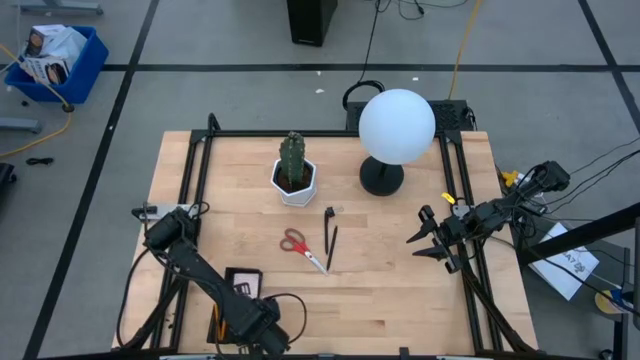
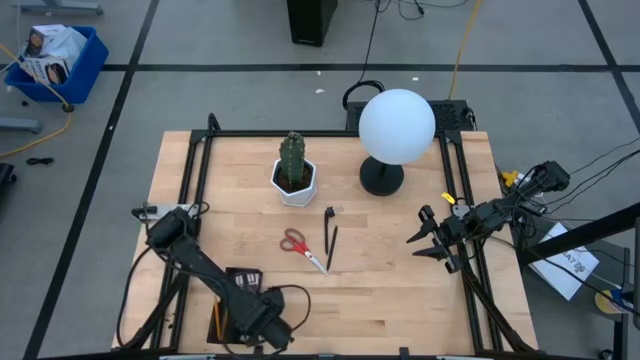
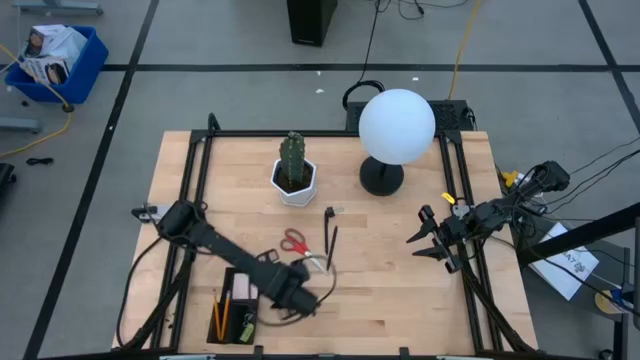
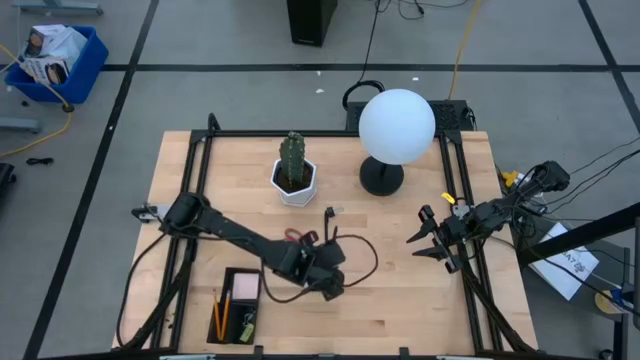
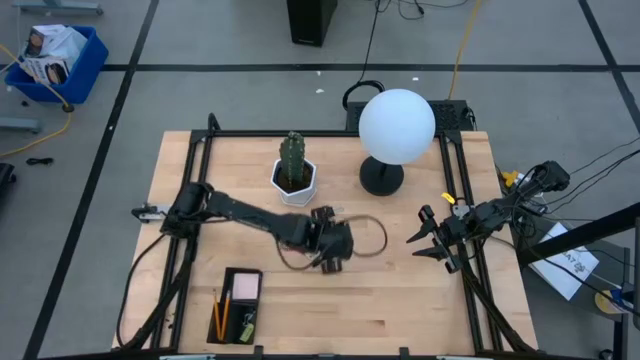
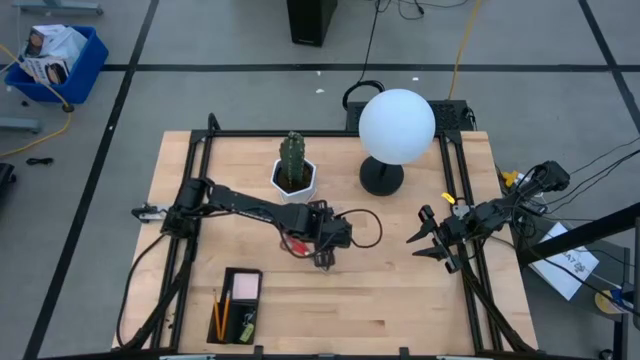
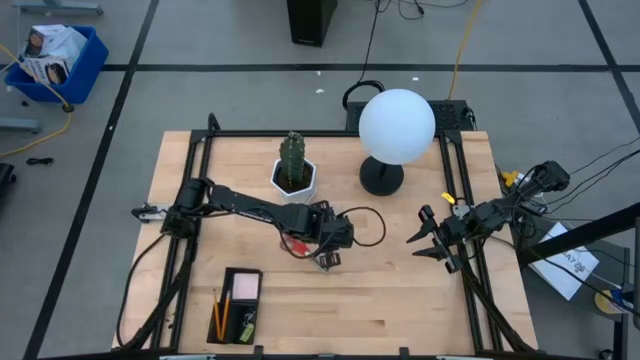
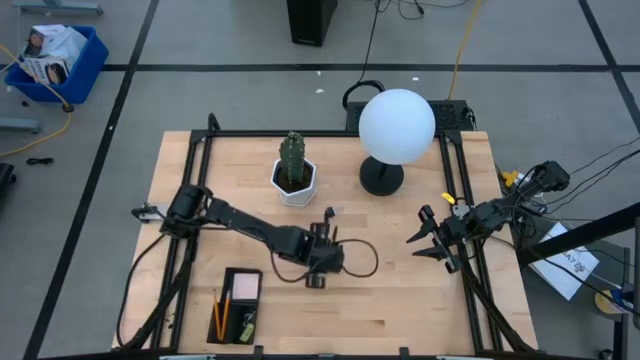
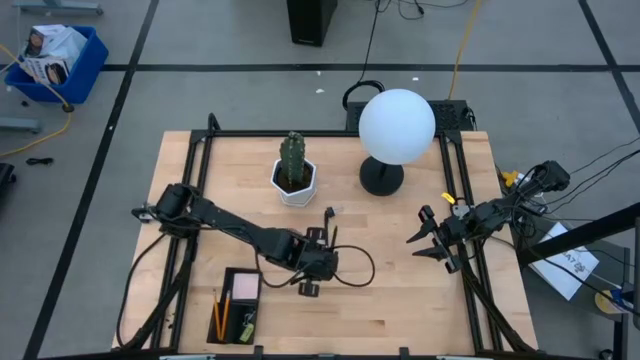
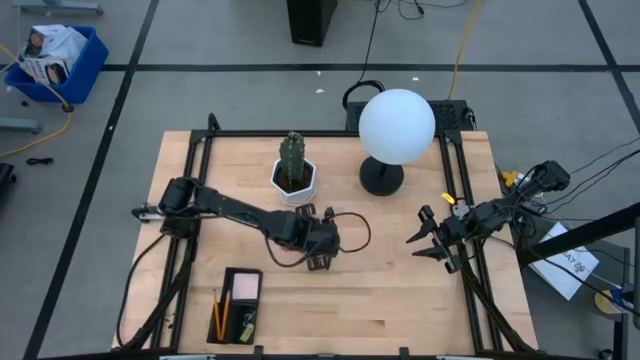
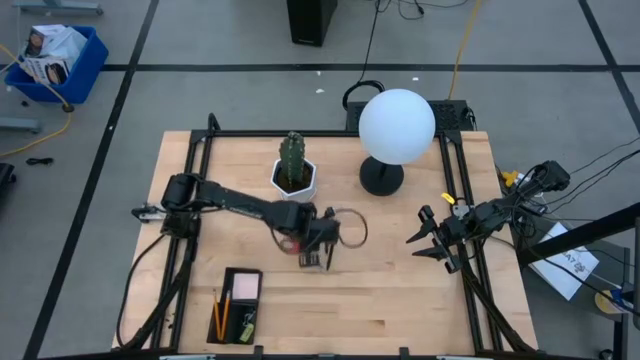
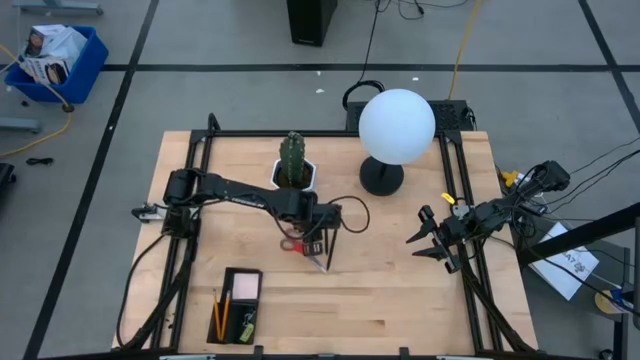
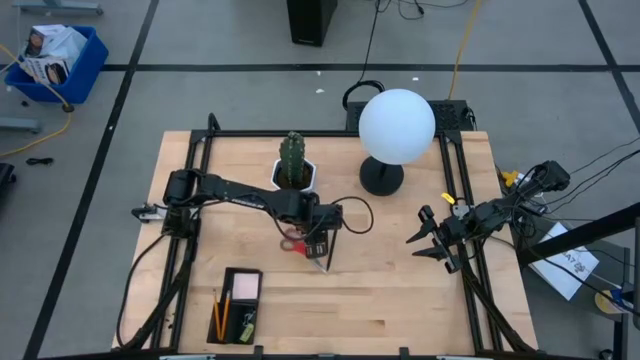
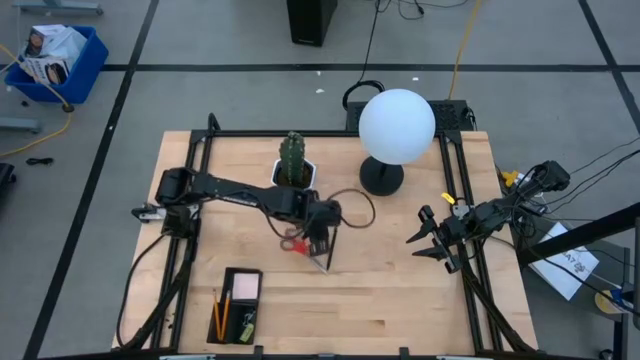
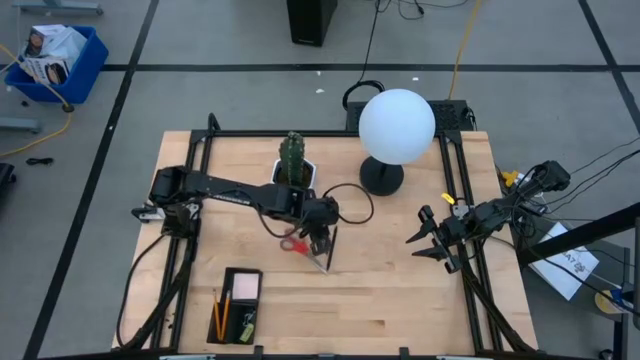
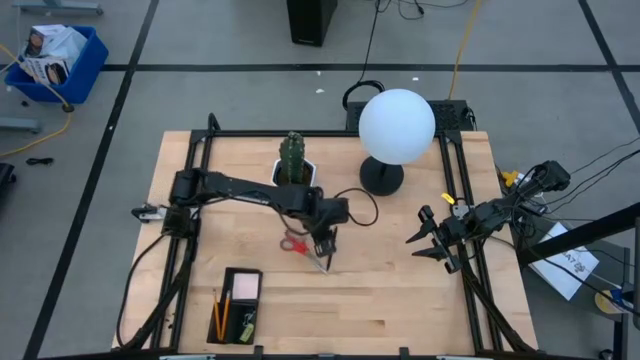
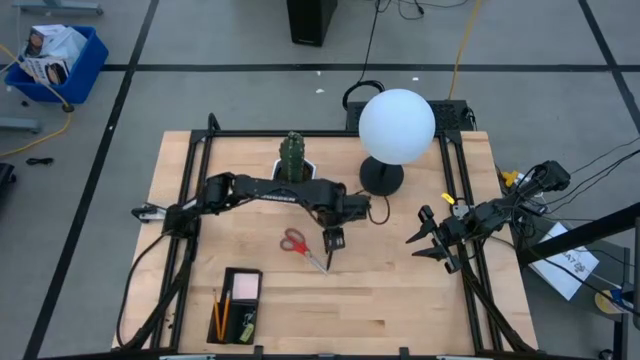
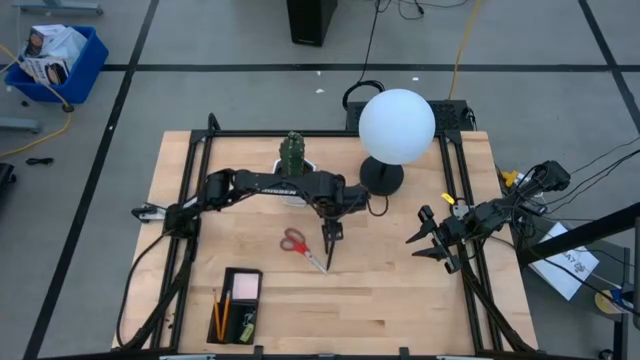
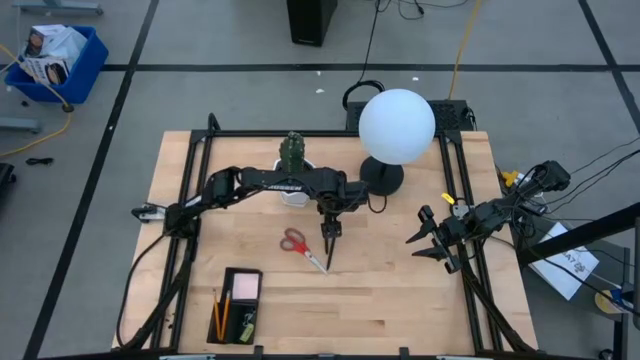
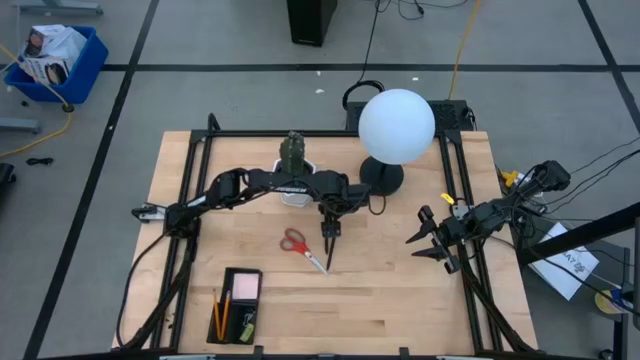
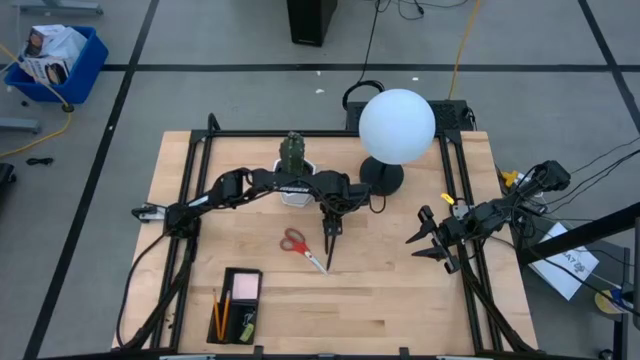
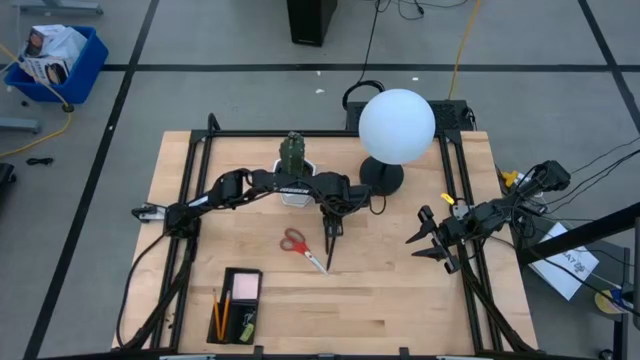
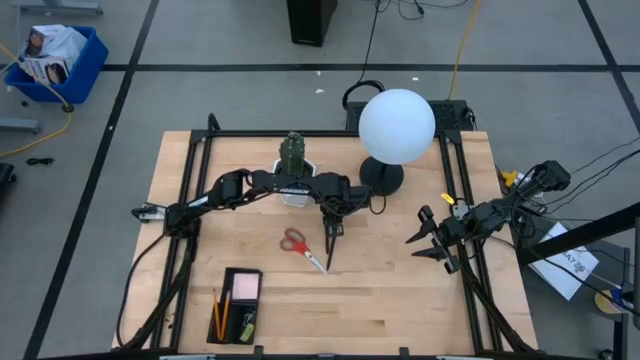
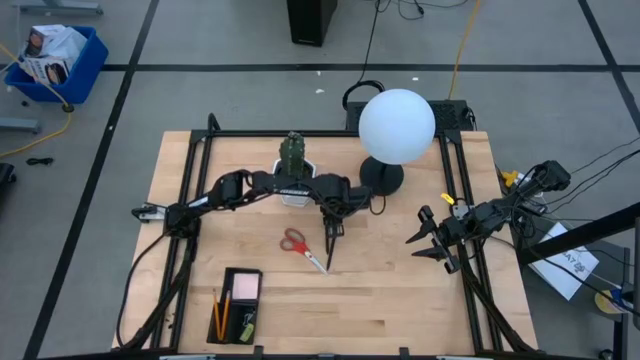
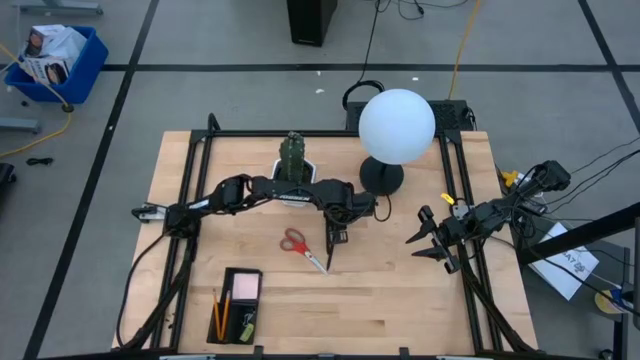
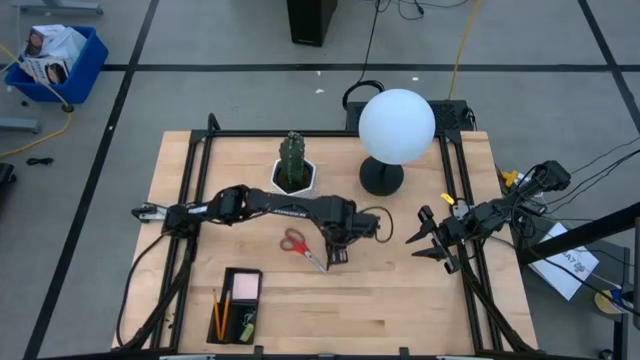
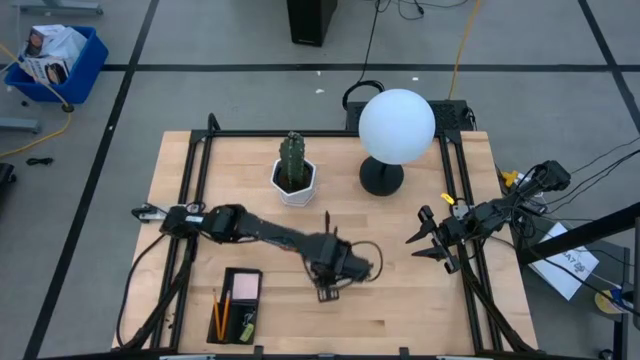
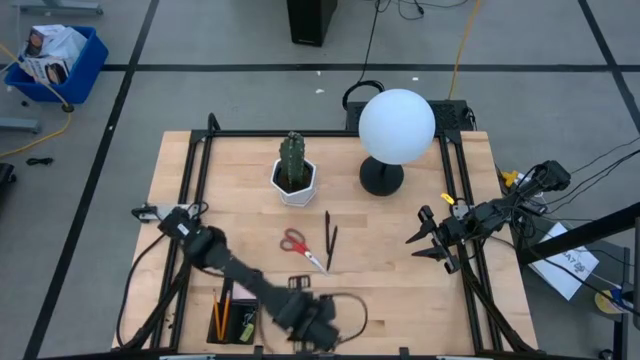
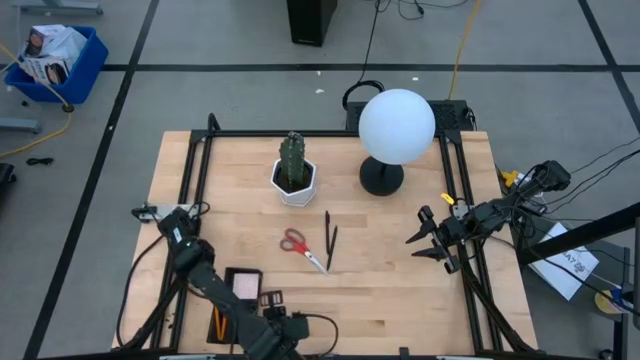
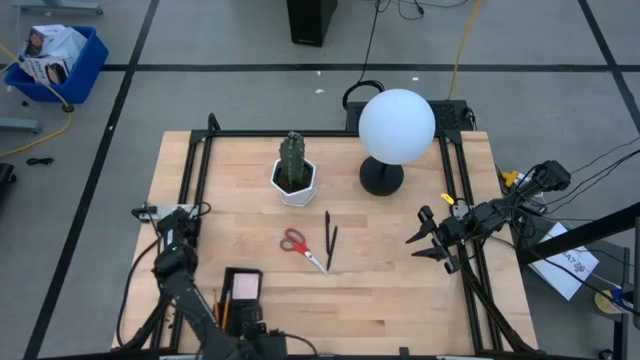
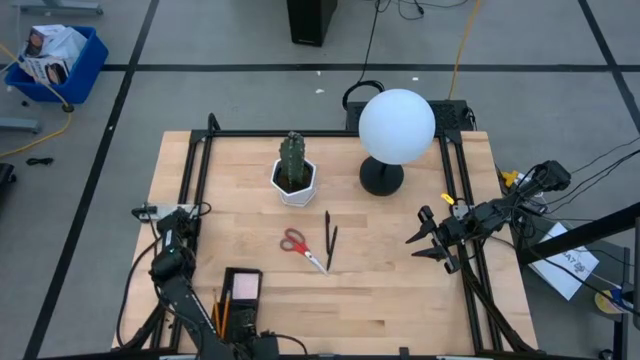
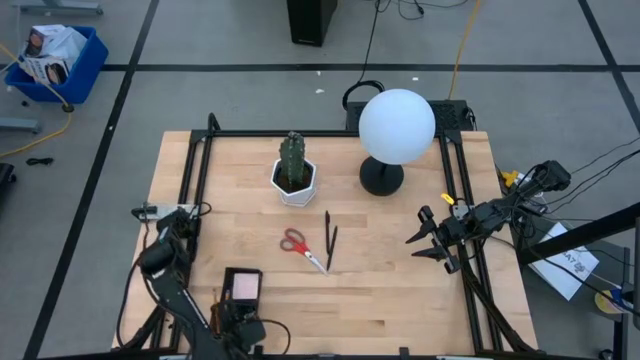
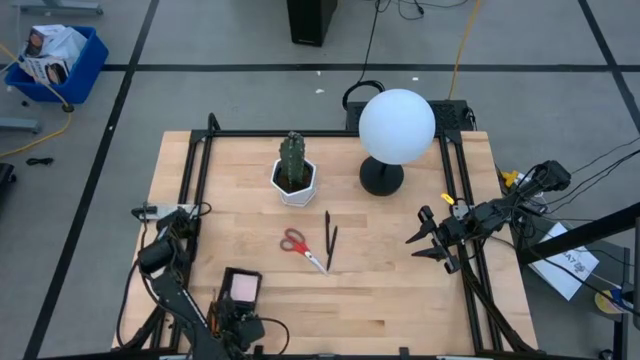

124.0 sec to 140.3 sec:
Task: Pick and place office supplies into organizer
Put the binder clip in the desk organizer

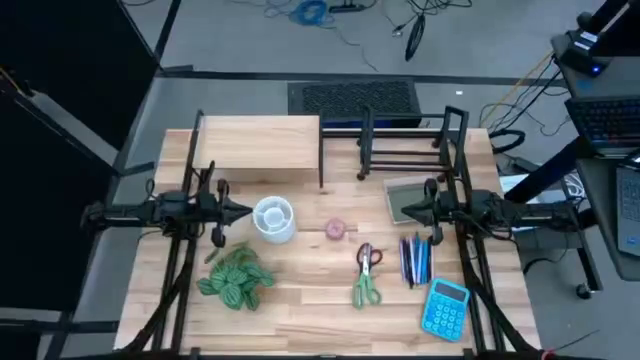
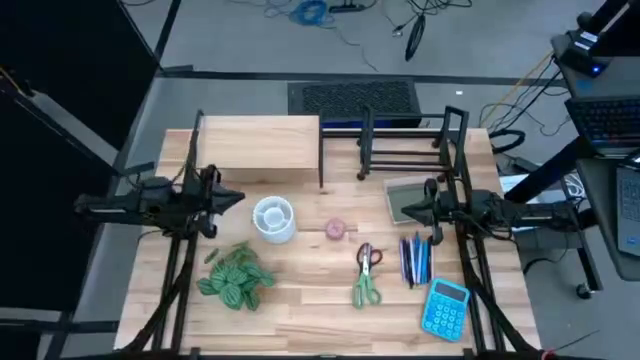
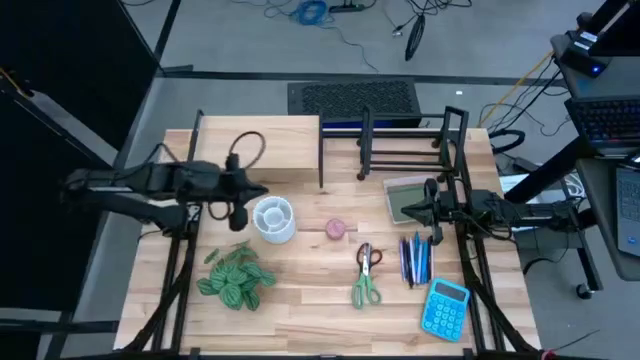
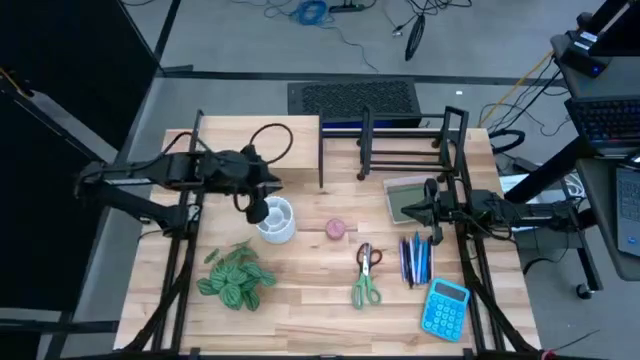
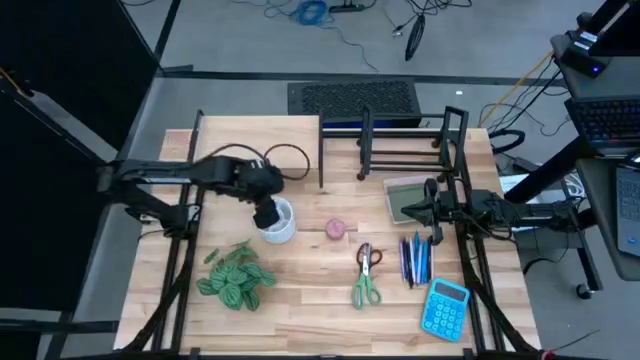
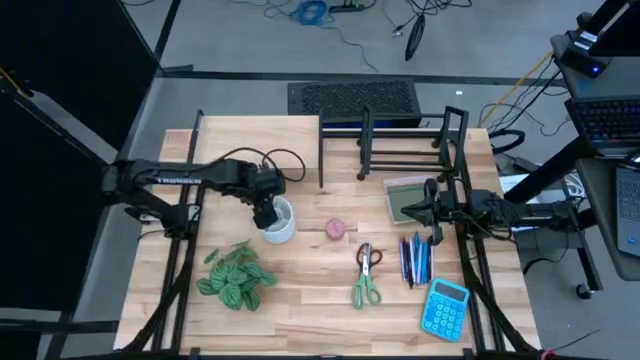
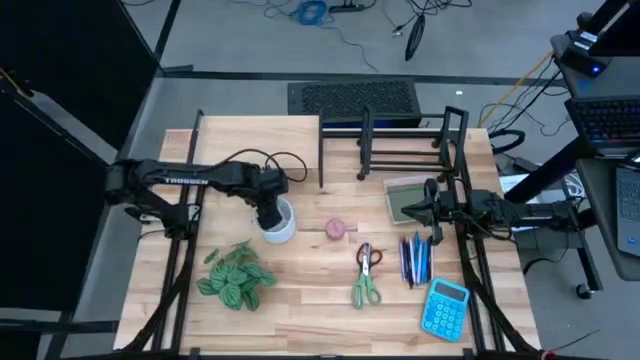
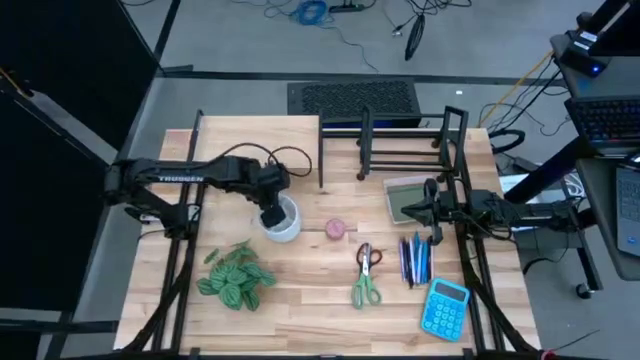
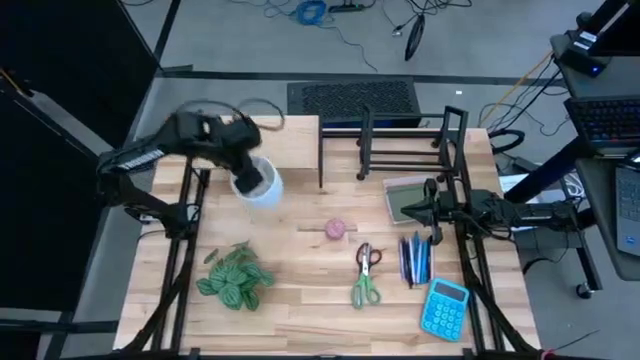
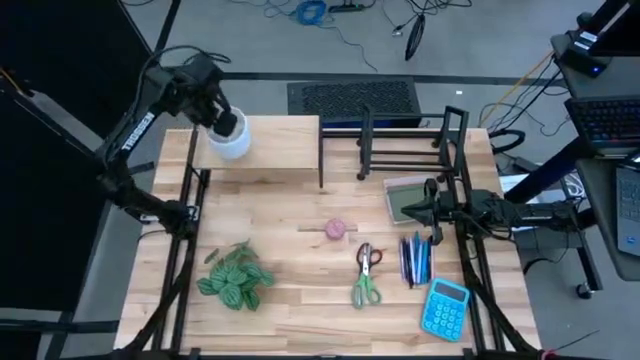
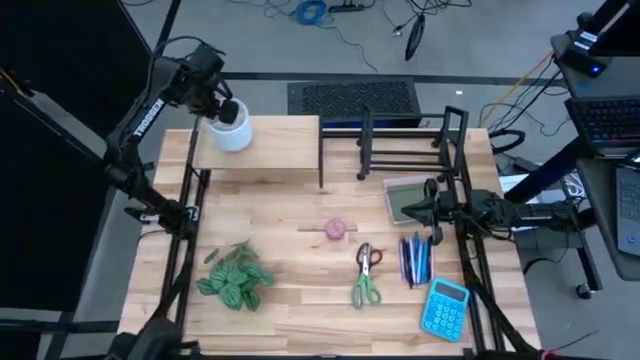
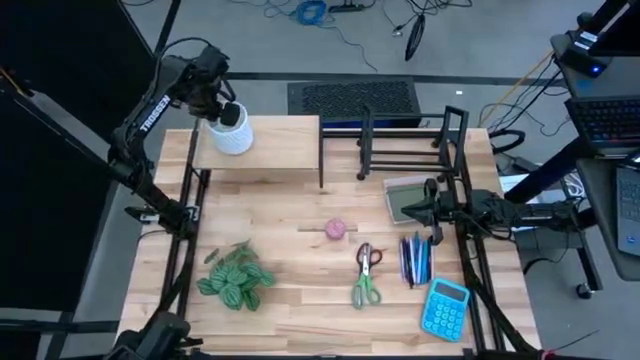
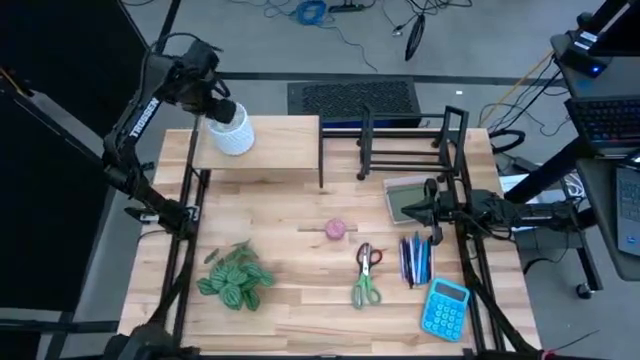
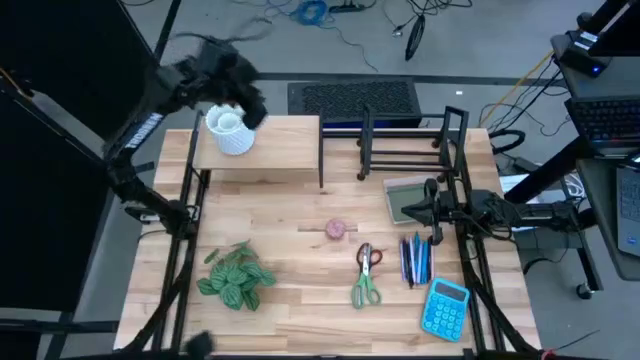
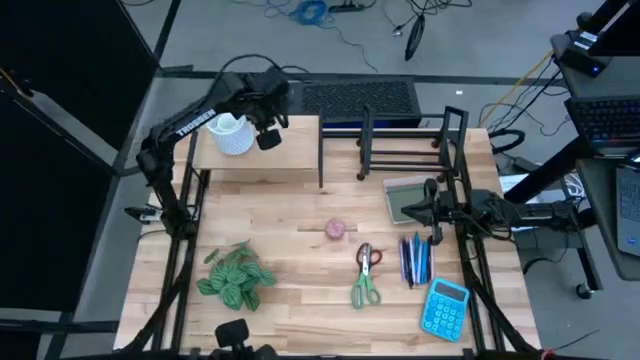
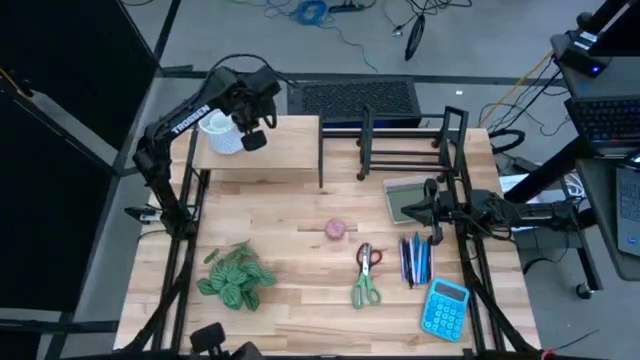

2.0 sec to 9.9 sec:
Task: Stock shelves
Put the white pen holder on the shelf
